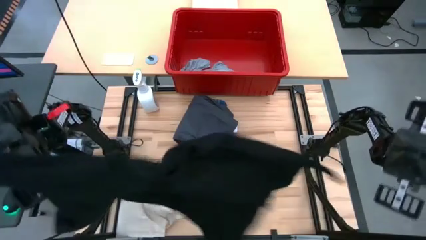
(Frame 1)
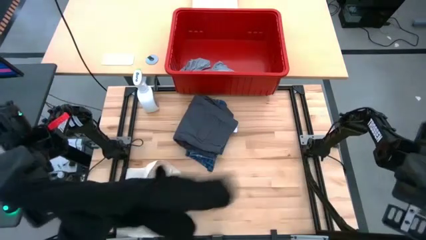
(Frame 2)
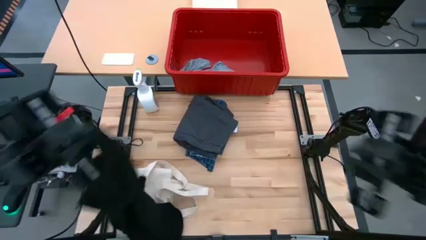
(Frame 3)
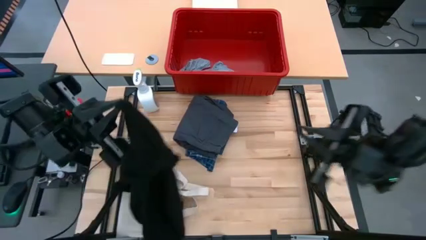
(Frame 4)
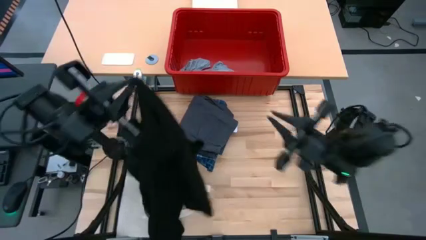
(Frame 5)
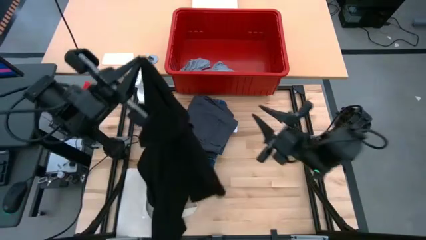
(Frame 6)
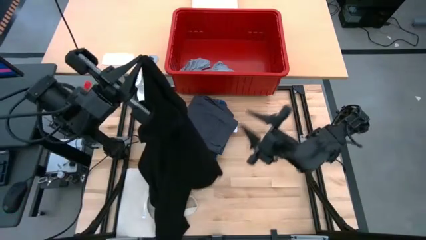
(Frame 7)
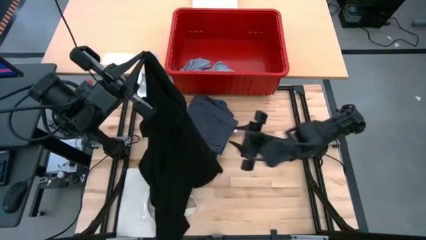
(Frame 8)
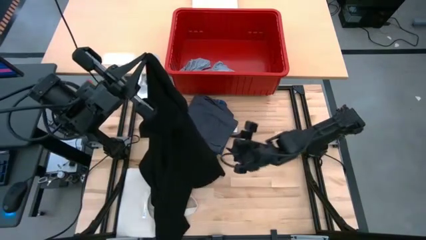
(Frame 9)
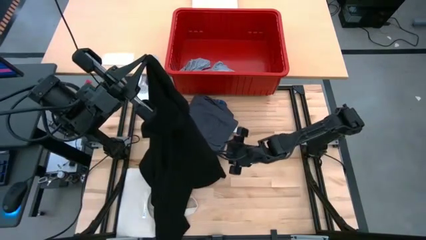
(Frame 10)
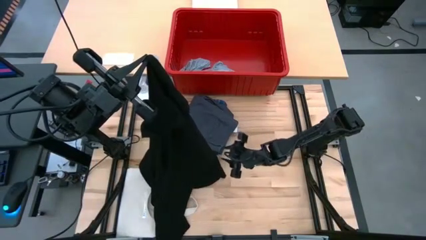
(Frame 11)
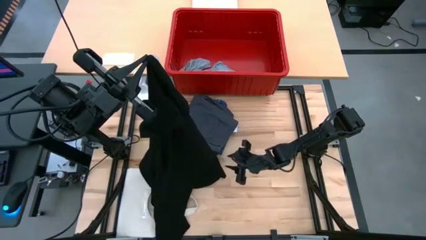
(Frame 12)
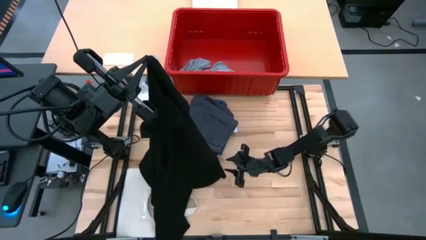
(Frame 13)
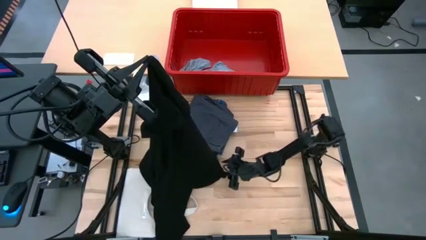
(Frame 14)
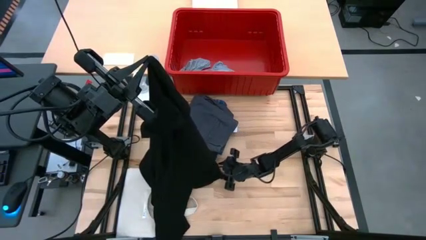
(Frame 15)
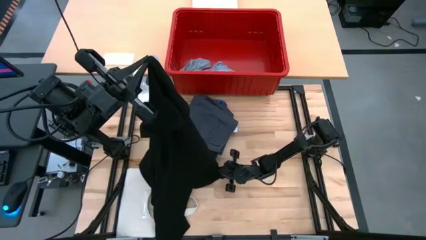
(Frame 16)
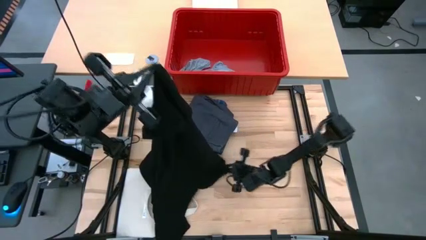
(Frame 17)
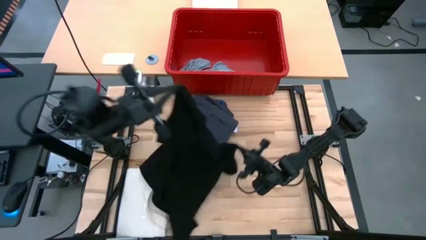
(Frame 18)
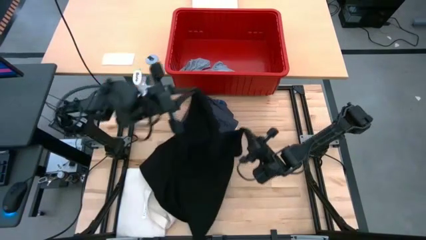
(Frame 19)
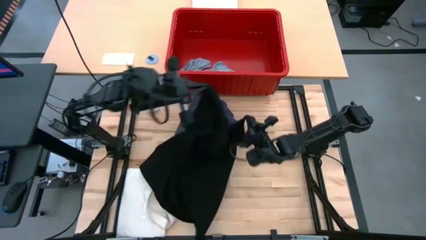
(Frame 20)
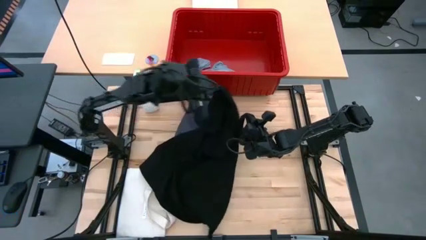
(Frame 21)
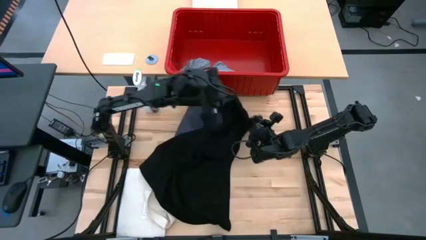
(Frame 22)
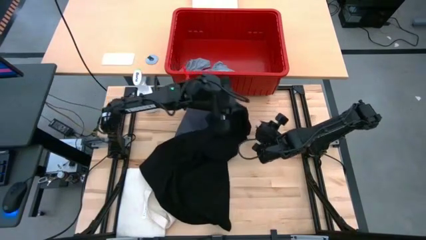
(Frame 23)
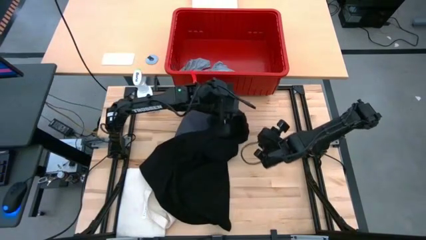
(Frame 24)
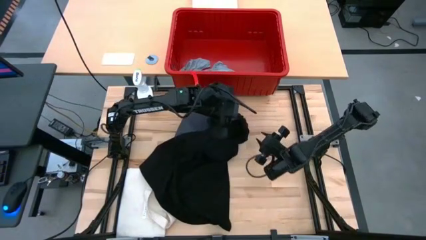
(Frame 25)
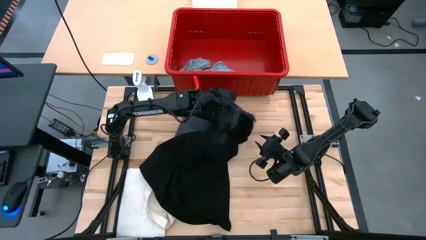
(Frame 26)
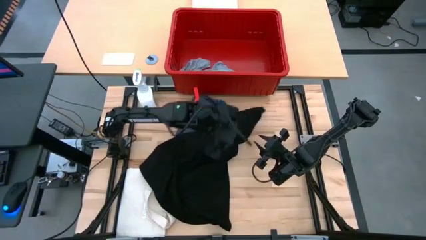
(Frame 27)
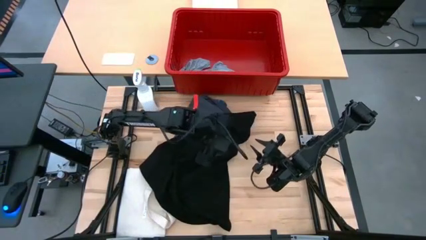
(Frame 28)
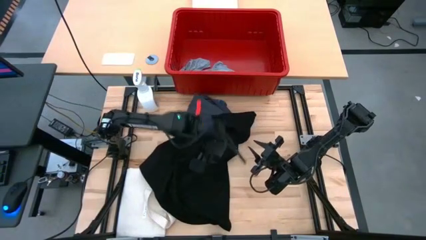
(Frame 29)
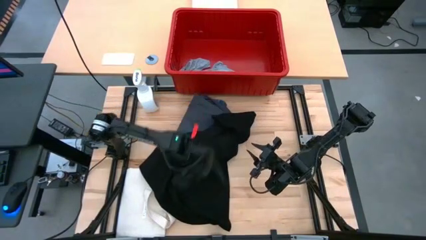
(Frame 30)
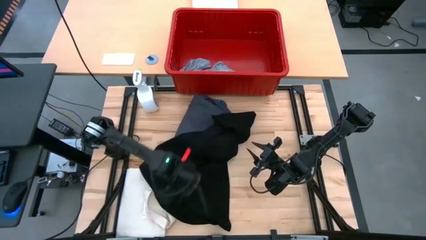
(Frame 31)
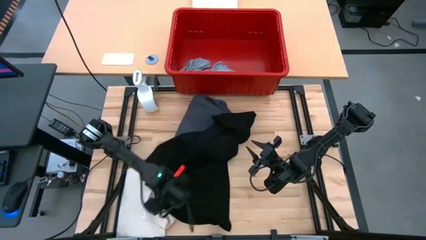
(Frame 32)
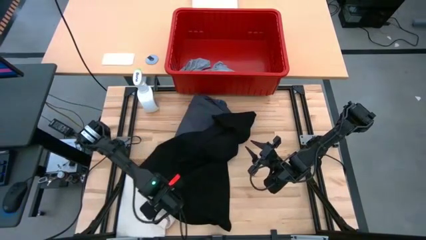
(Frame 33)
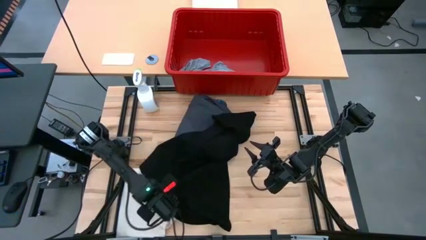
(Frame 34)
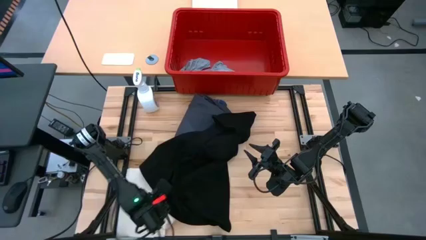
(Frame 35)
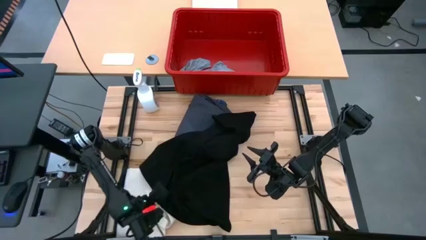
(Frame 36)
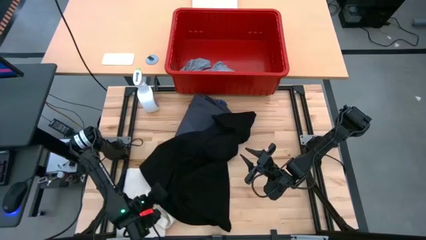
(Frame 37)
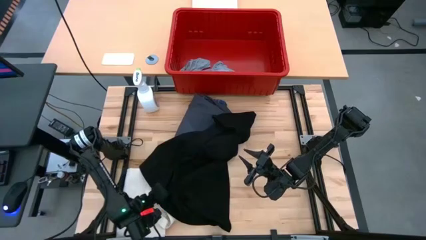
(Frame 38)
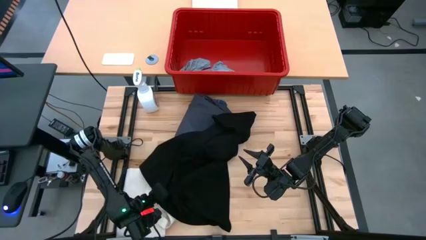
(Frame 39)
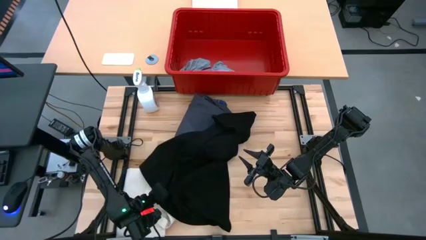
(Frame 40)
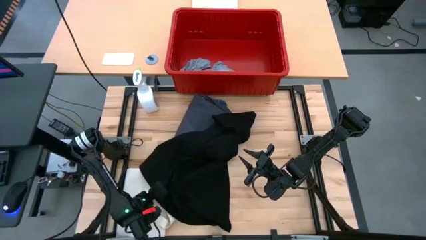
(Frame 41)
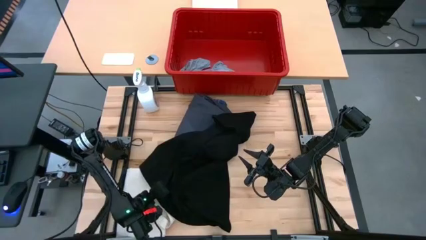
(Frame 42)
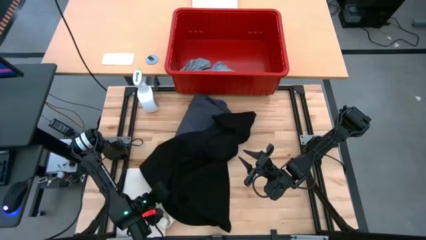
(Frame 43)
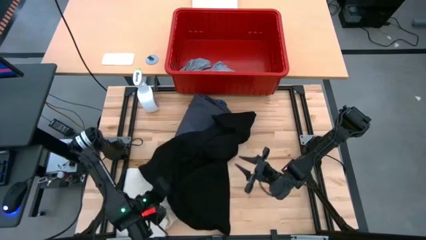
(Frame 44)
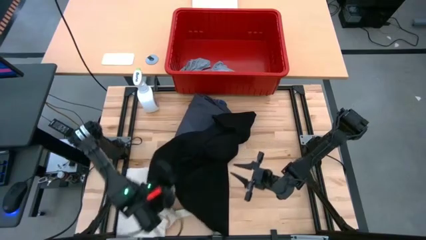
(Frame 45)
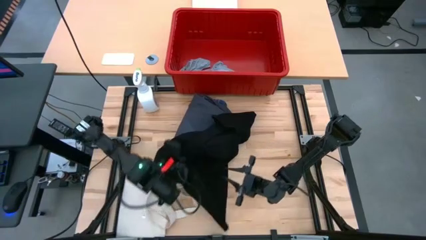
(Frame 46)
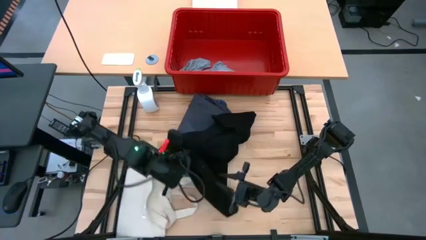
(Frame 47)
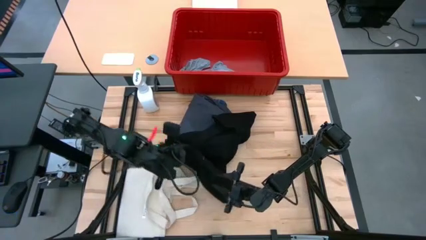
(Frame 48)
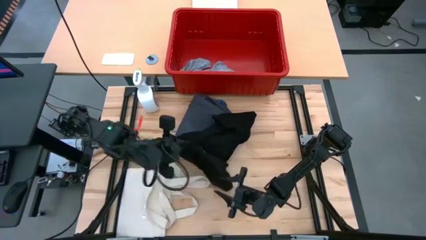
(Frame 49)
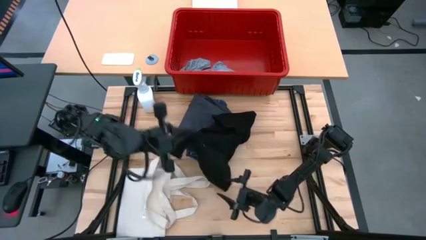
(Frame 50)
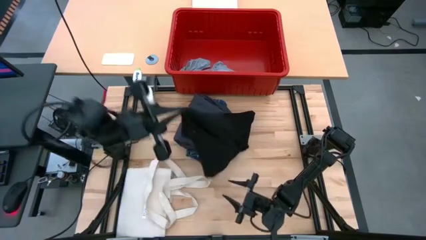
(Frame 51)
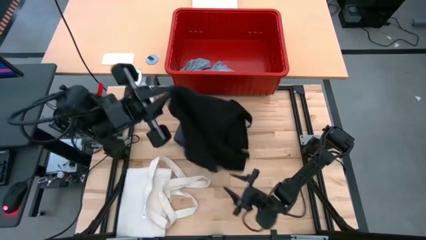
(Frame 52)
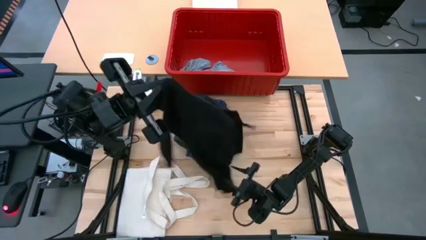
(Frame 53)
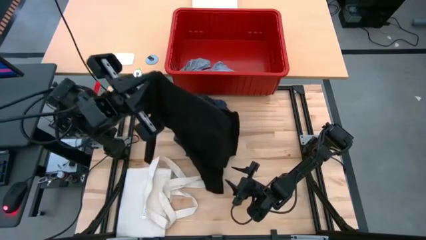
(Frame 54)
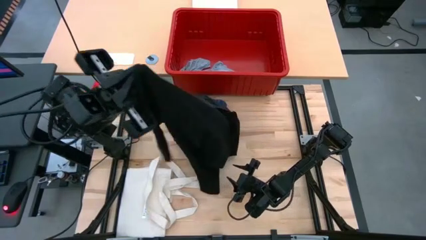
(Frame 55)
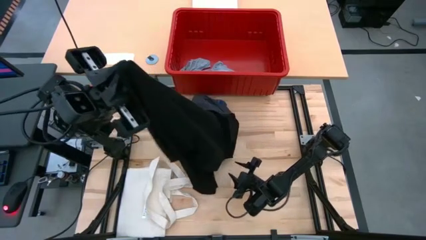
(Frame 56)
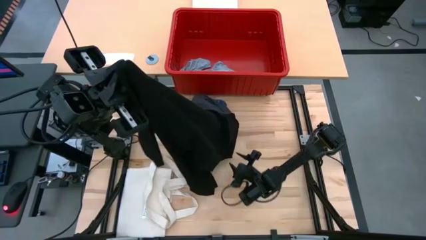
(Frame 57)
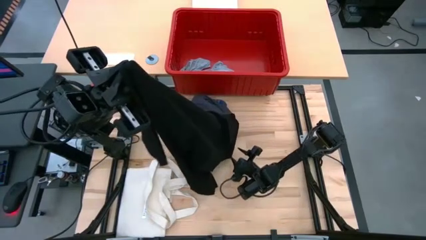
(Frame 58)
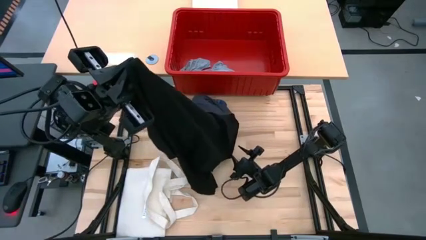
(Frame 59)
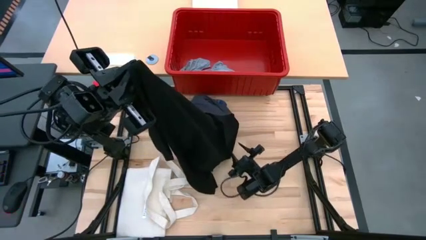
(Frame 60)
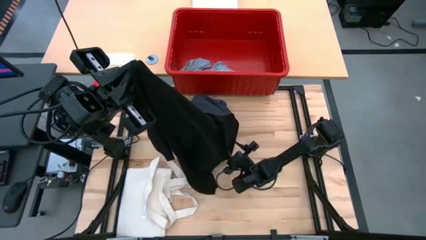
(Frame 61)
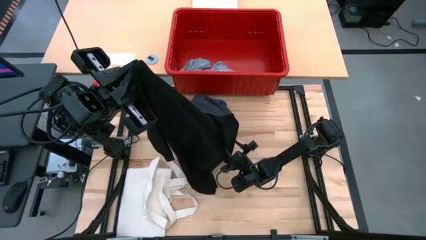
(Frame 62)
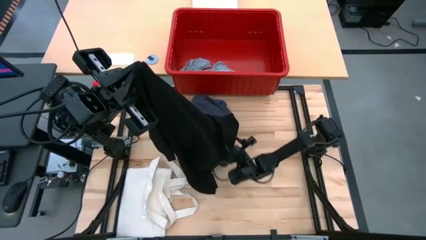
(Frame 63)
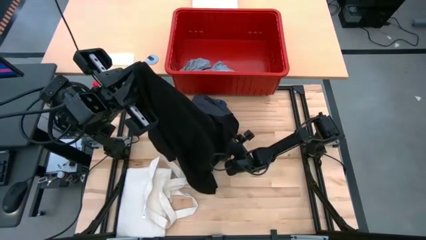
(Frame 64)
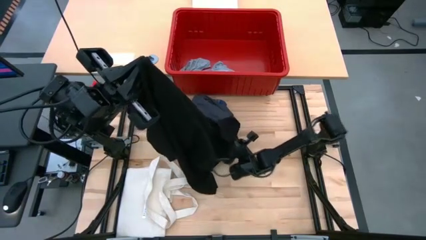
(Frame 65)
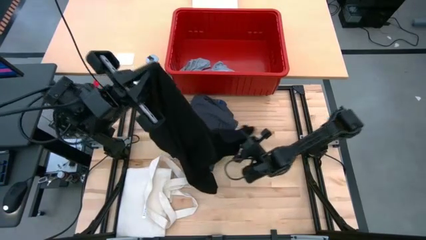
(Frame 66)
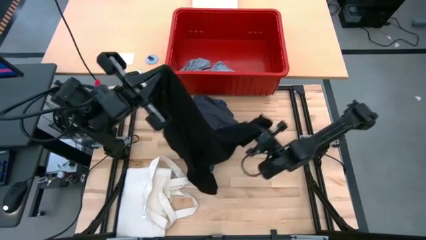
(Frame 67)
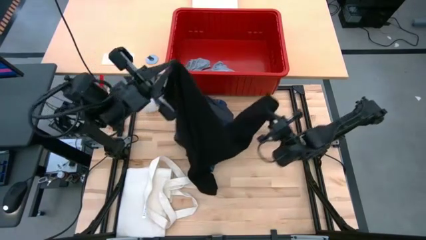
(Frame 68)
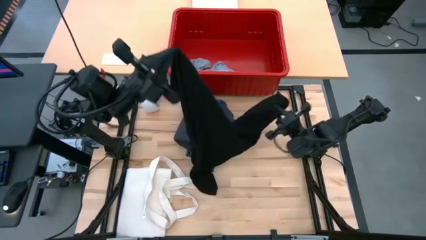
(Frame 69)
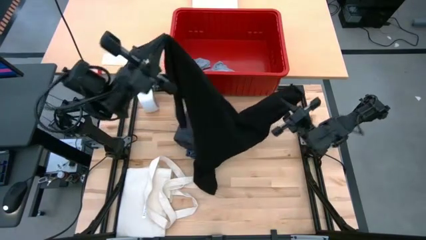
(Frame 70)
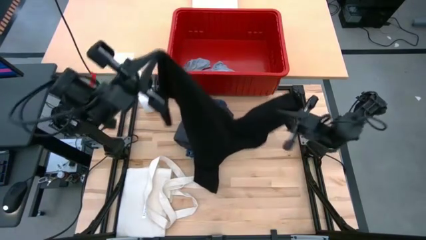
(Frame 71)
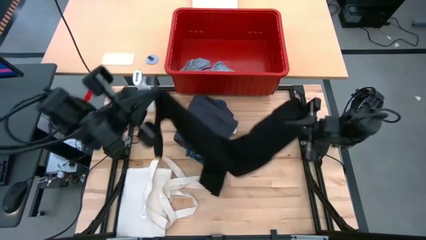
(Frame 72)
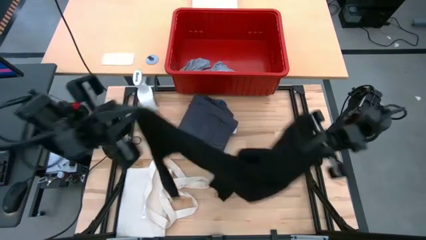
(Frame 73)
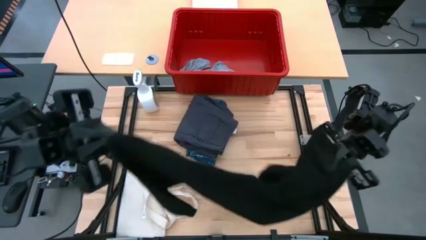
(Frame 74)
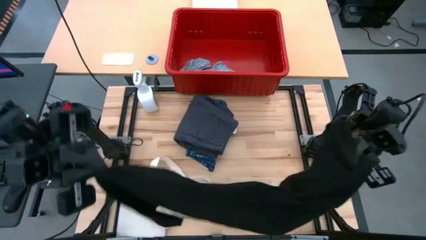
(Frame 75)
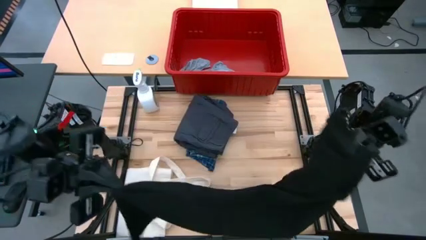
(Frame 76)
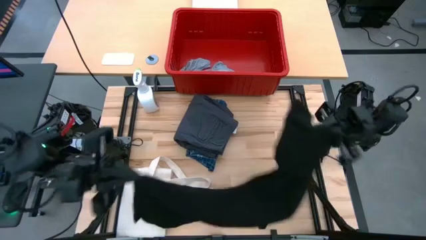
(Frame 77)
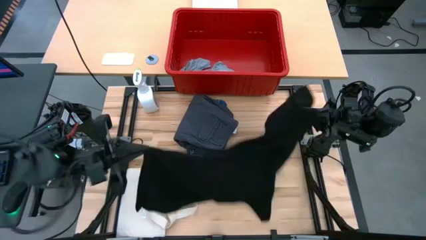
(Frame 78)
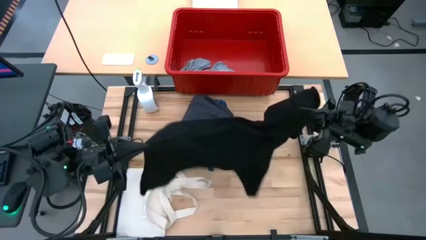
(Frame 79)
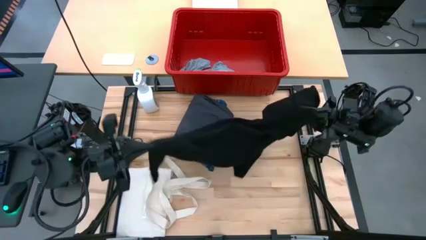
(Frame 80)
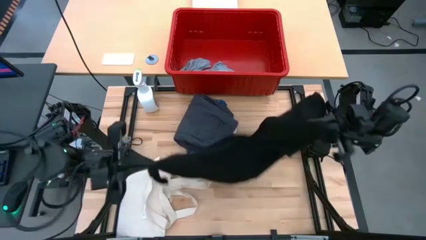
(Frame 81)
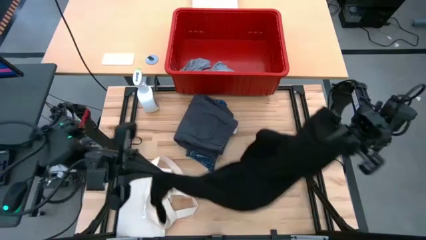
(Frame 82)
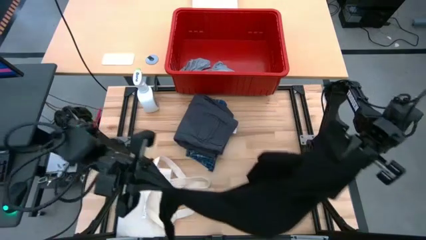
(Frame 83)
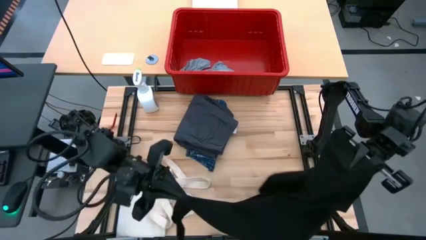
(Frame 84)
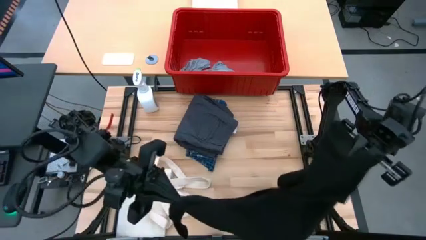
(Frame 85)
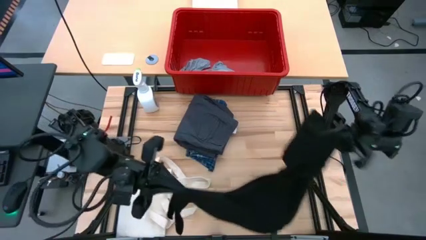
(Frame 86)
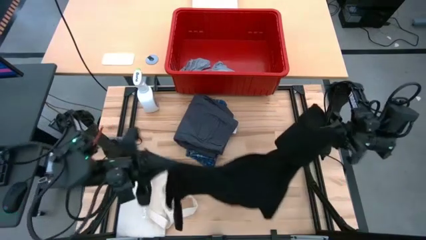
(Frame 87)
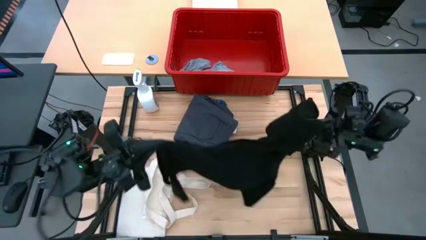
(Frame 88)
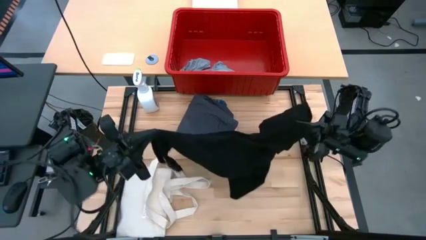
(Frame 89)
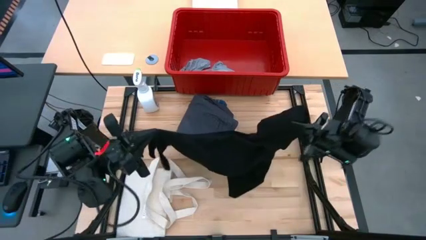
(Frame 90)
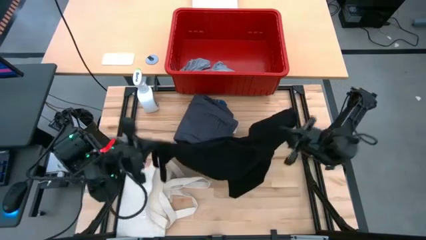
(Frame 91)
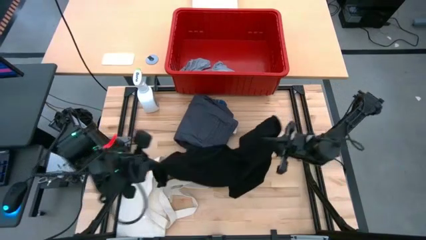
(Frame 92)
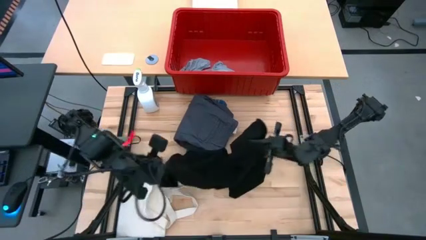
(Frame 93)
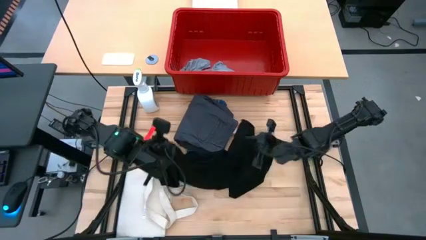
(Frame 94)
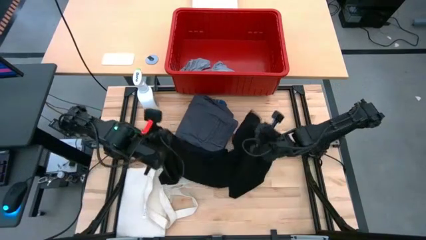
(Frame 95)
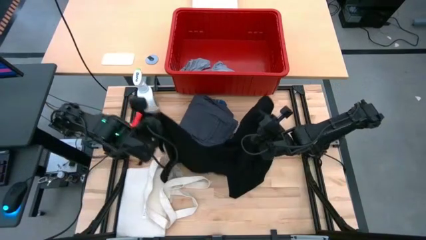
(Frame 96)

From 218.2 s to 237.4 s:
Task: Fold Laundry from Bin
Fold the black shirt
